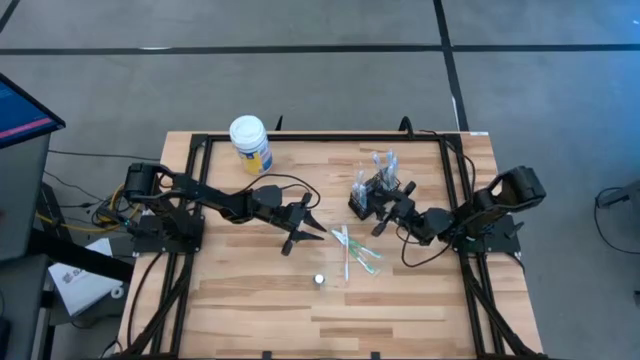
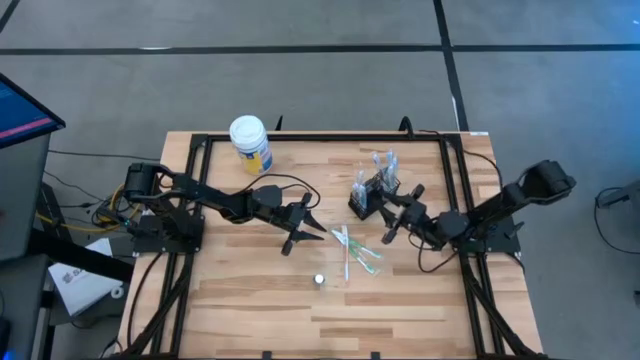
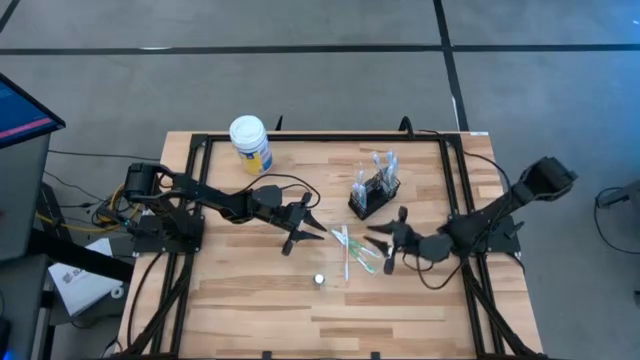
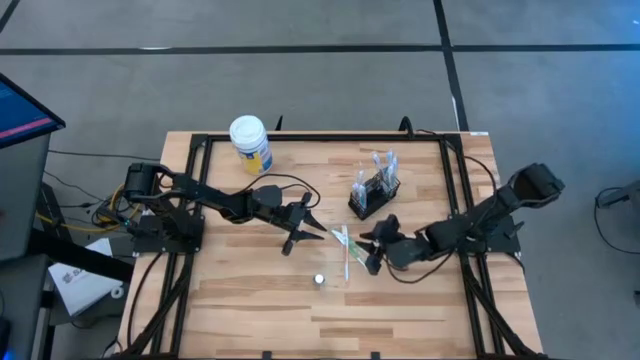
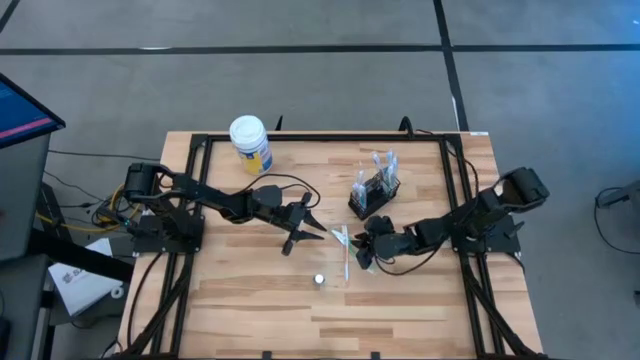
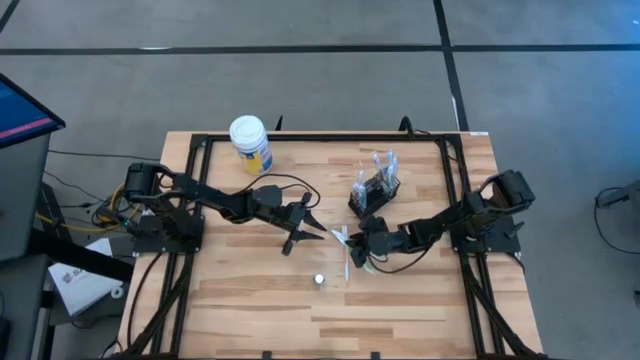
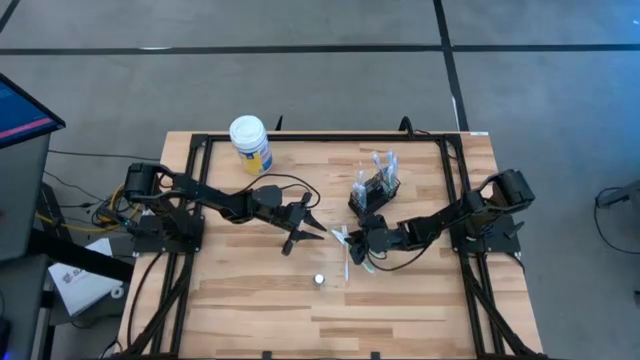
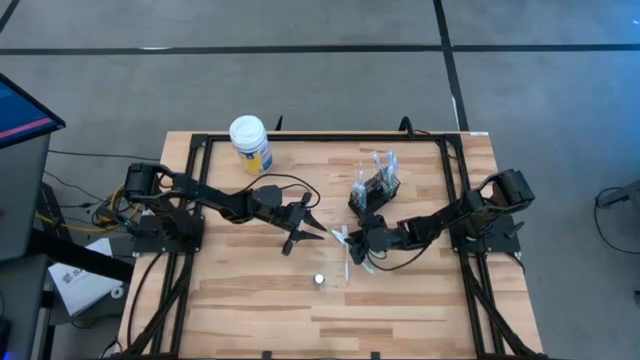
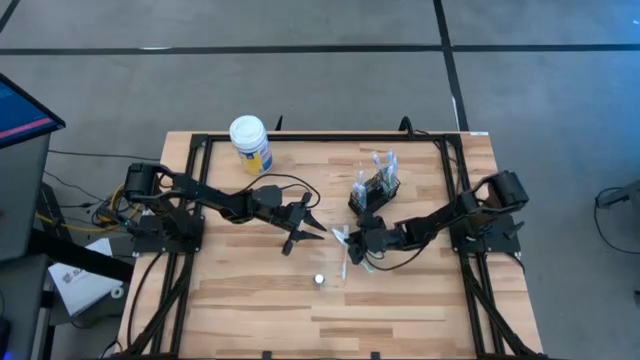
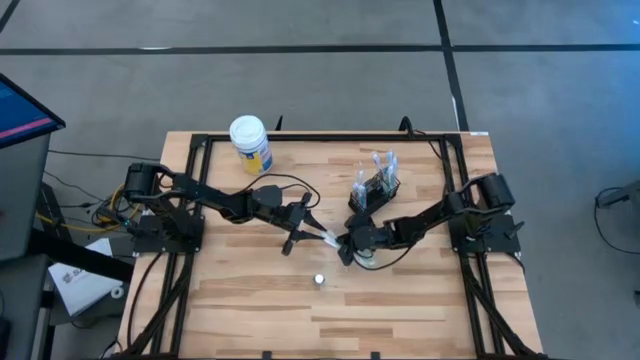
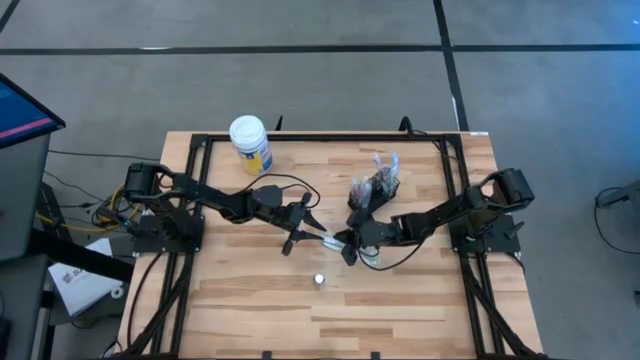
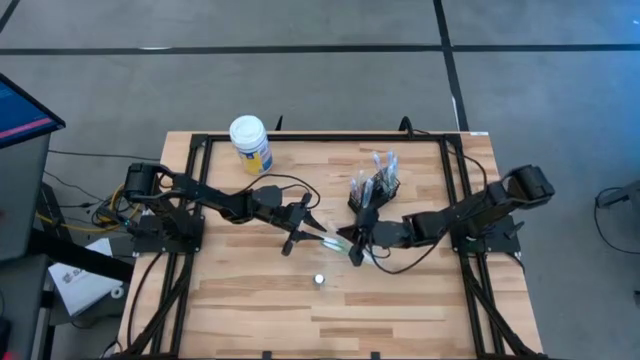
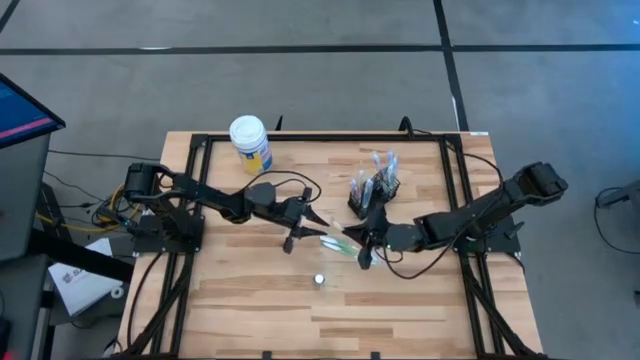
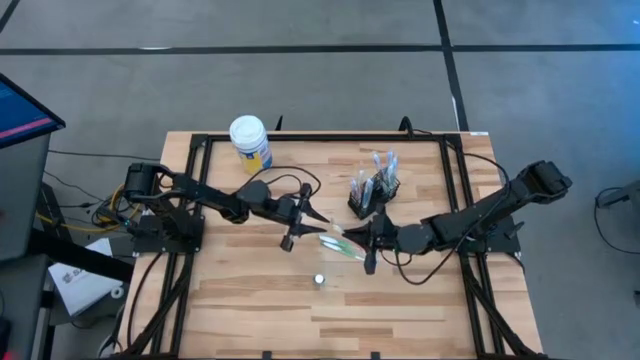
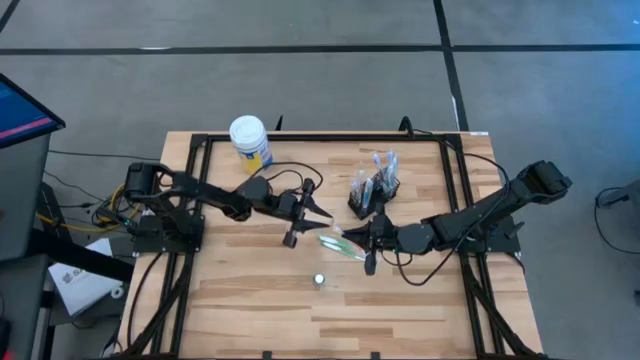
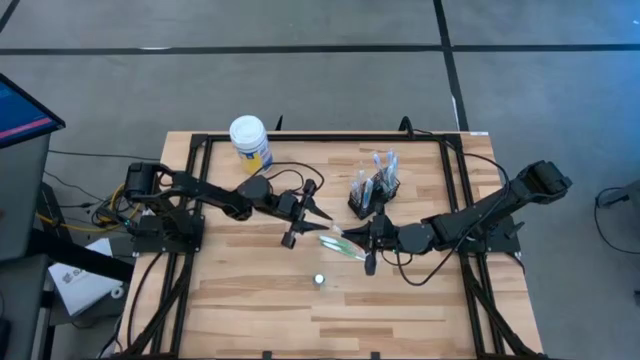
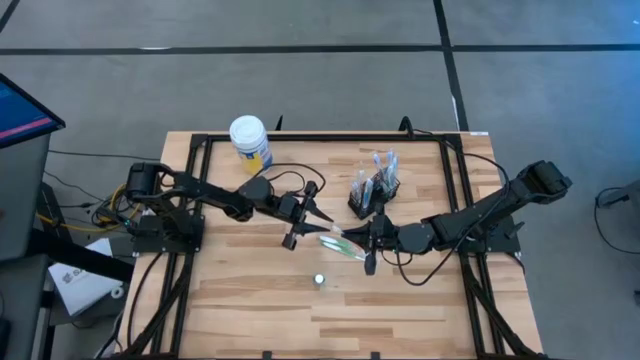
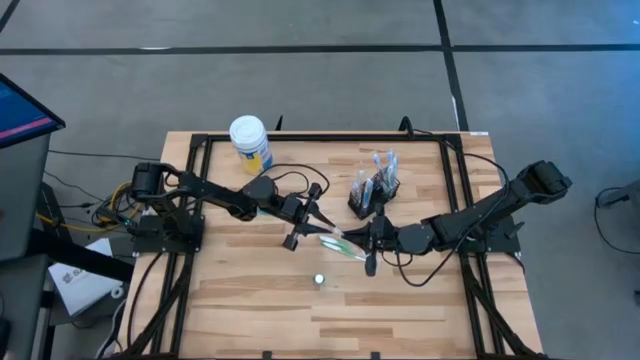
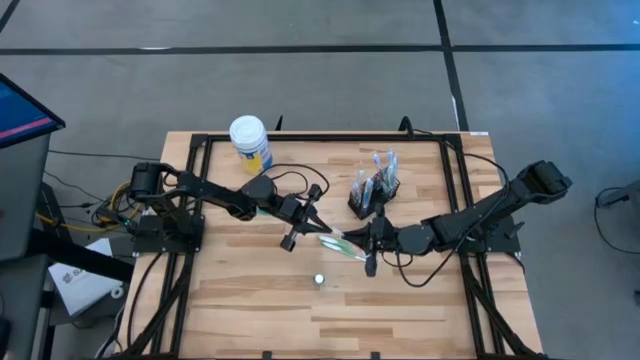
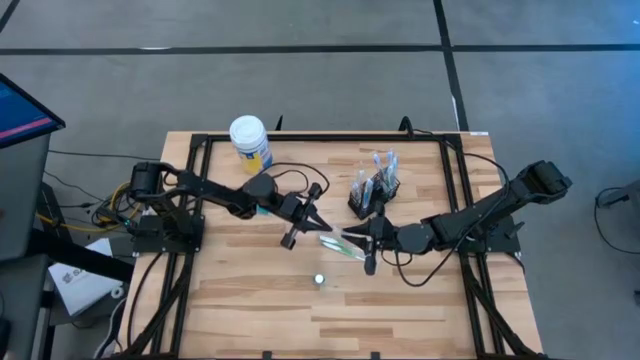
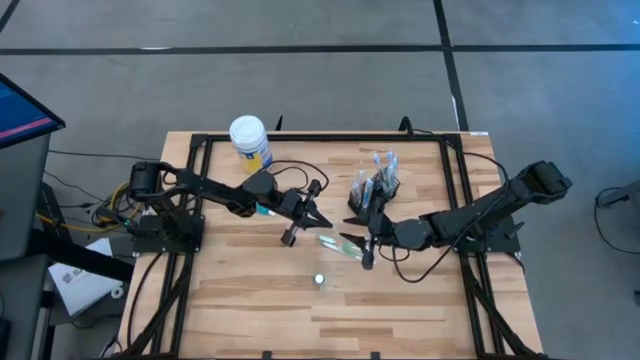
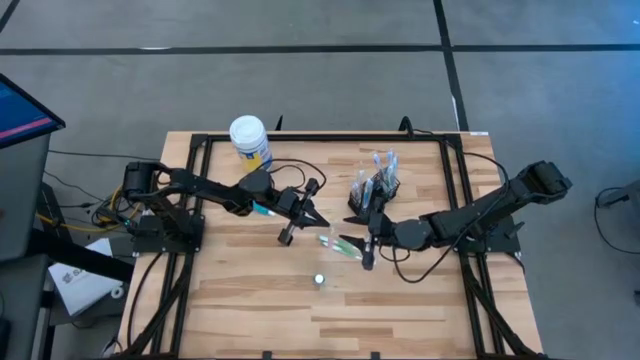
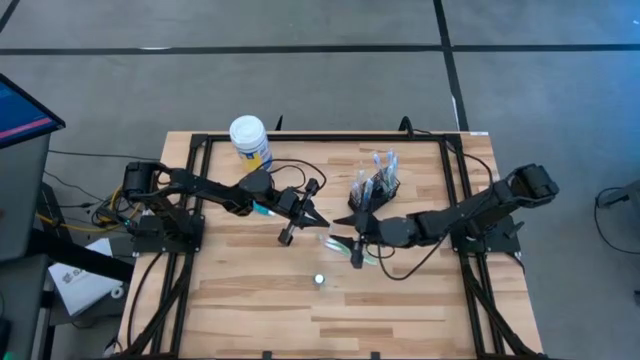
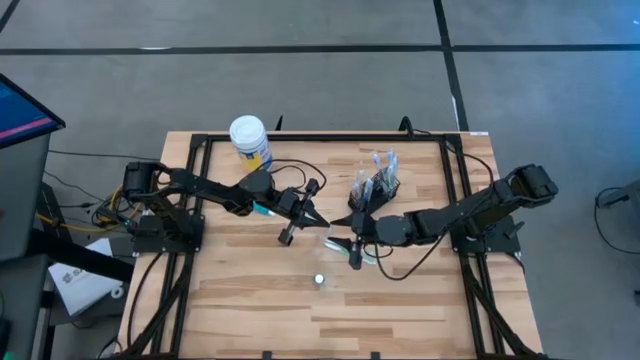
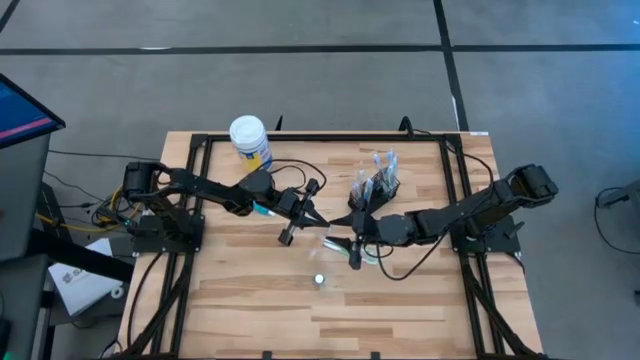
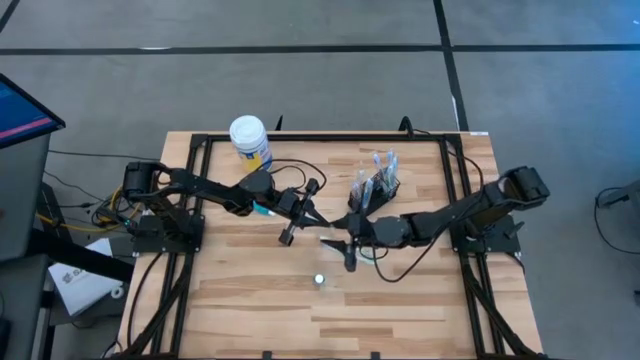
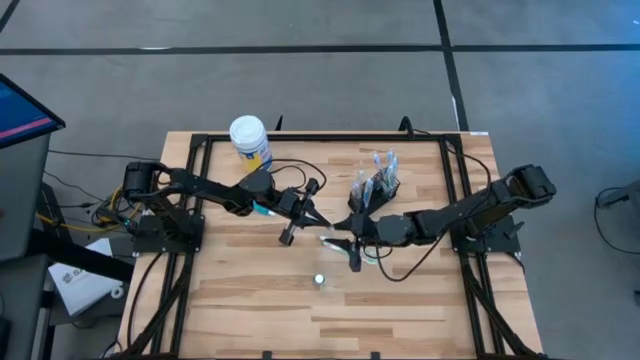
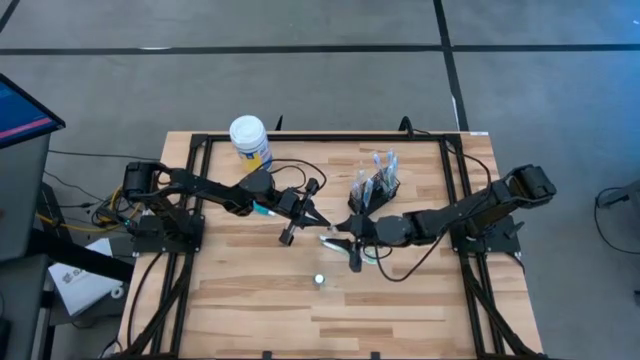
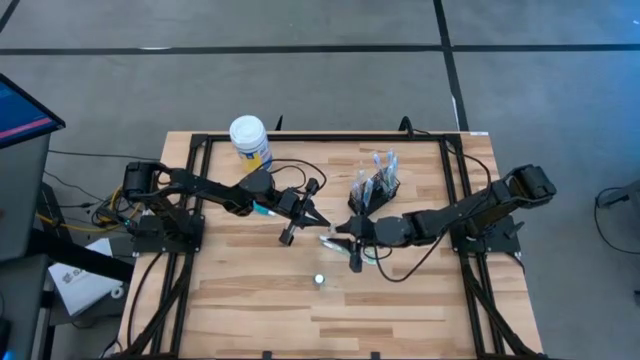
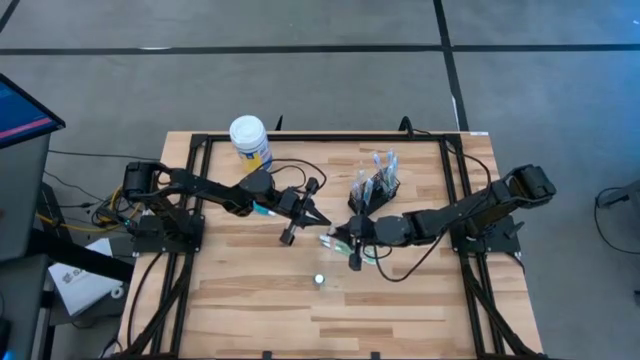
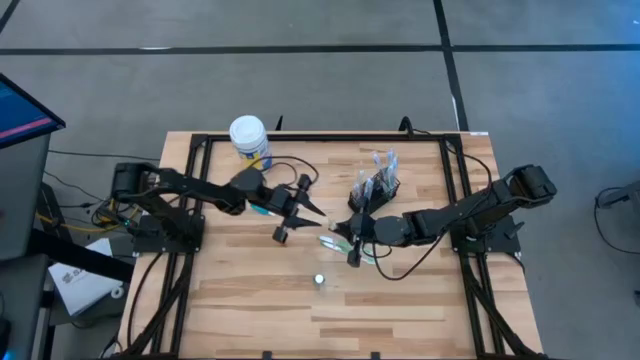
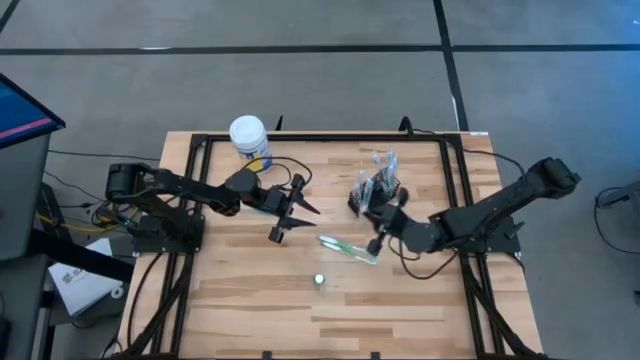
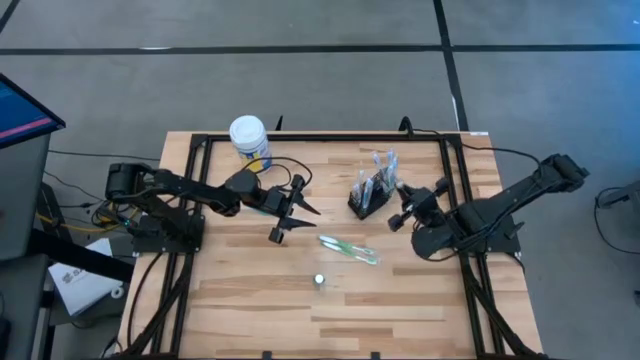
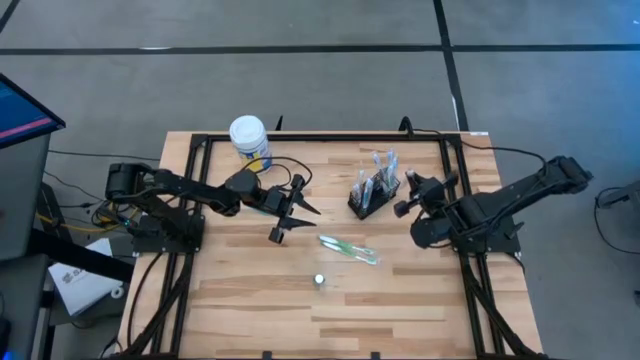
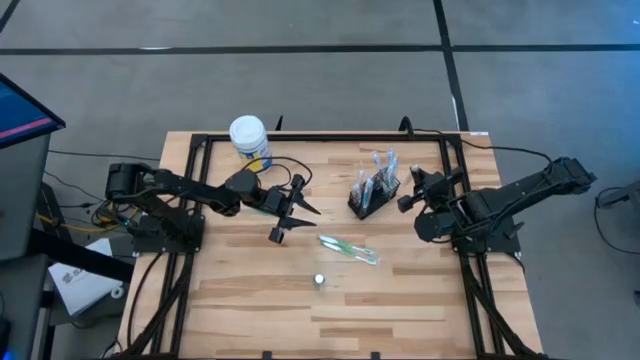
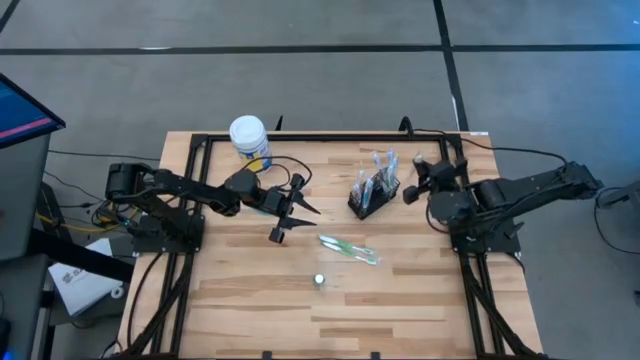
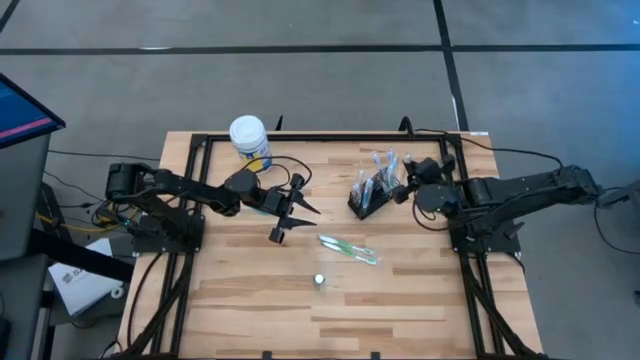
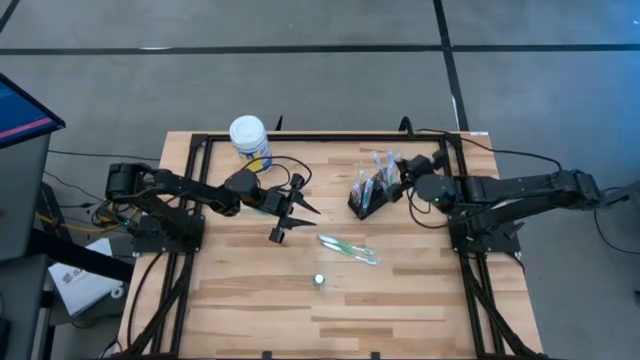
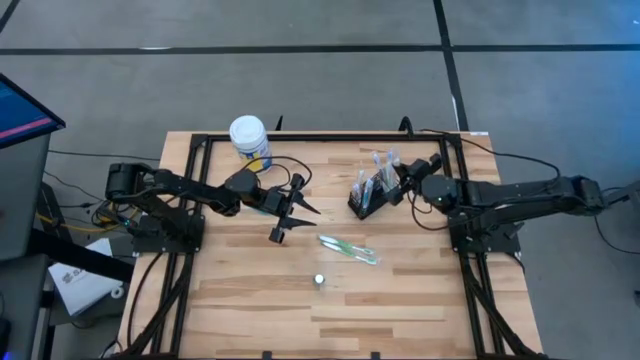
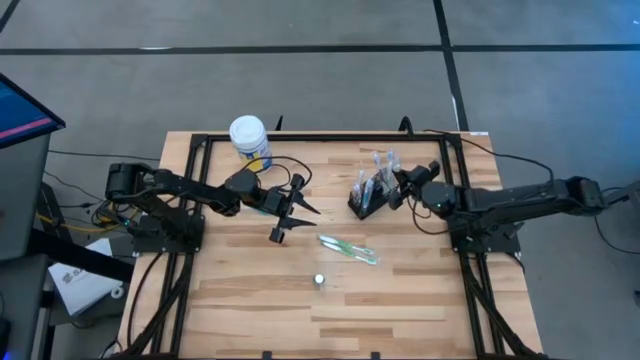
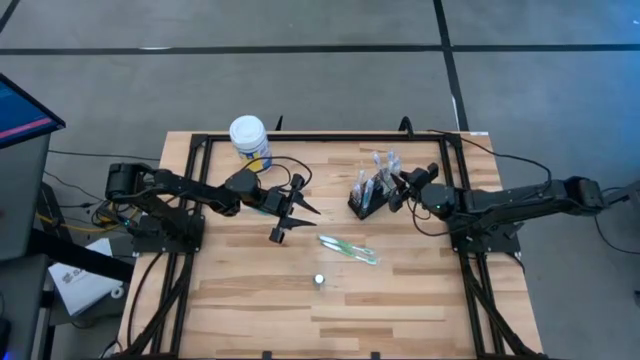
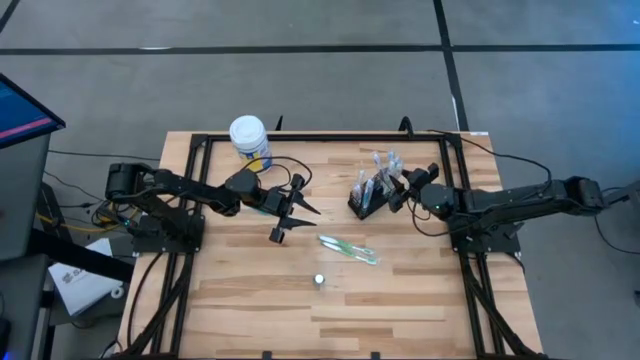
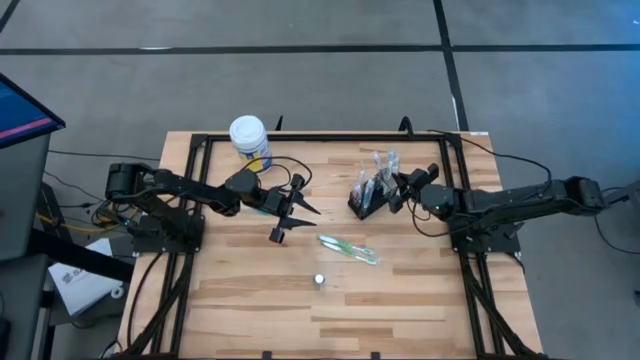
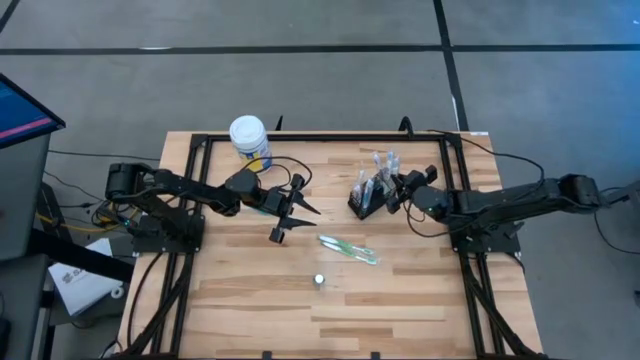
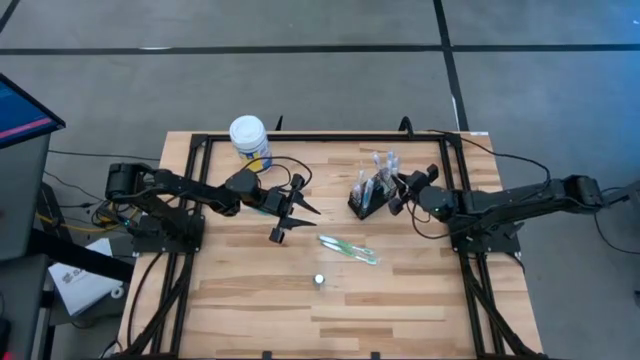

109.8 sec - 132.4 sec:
Task: Pick & Place toothbrushing station
Put the orange toothbrush into the mesh organizer
